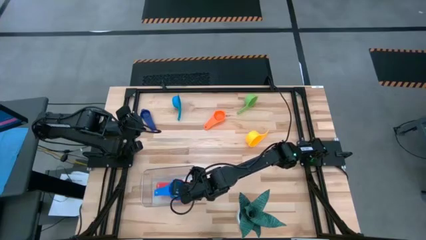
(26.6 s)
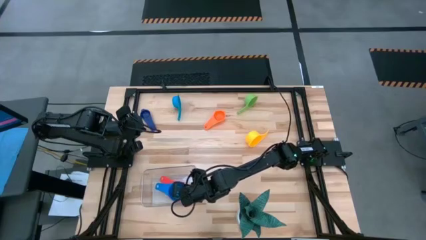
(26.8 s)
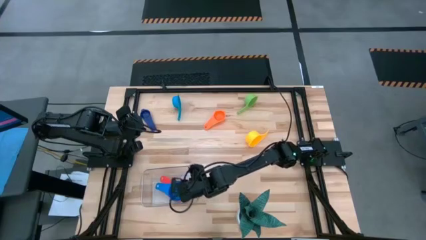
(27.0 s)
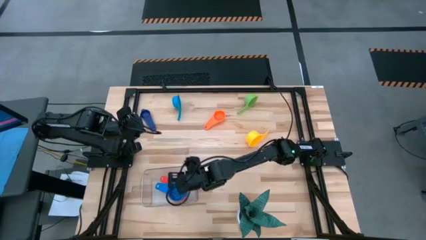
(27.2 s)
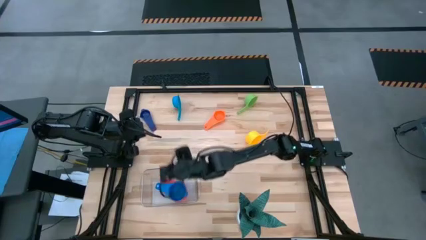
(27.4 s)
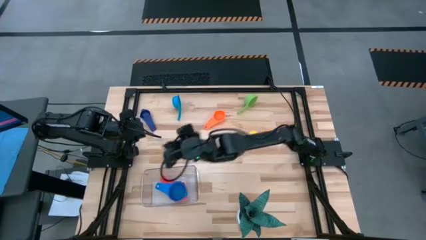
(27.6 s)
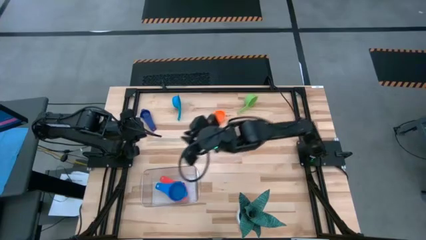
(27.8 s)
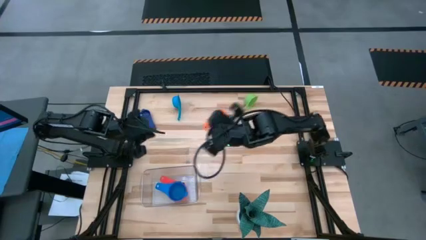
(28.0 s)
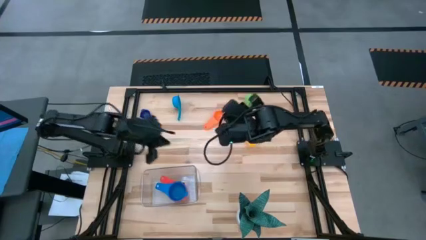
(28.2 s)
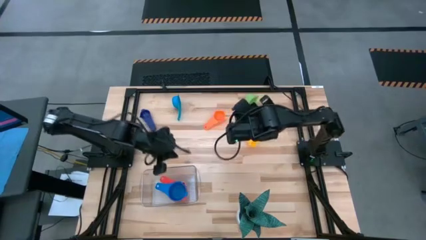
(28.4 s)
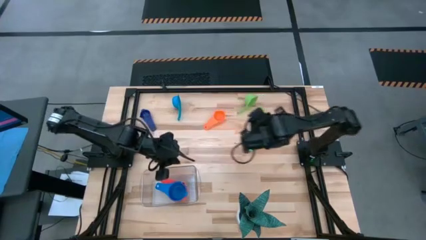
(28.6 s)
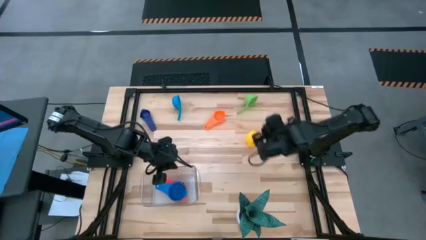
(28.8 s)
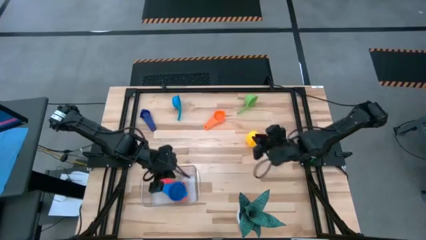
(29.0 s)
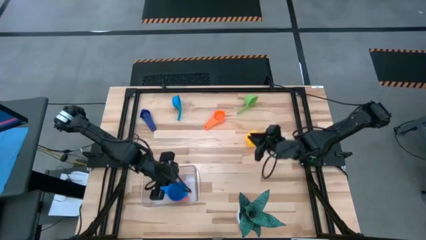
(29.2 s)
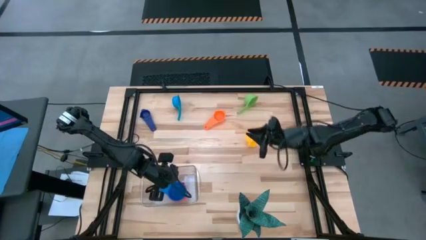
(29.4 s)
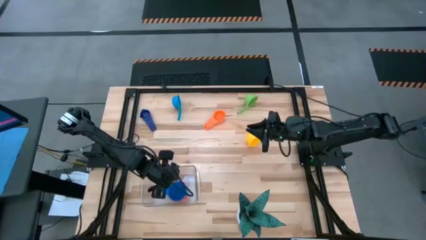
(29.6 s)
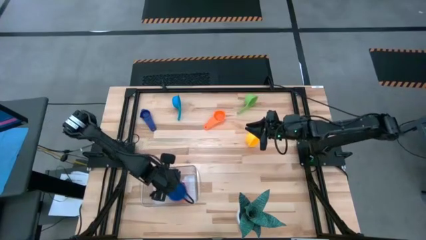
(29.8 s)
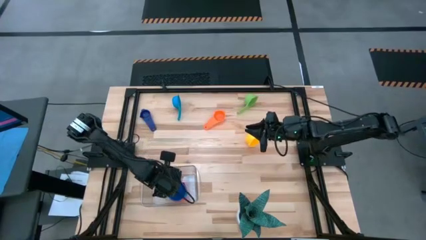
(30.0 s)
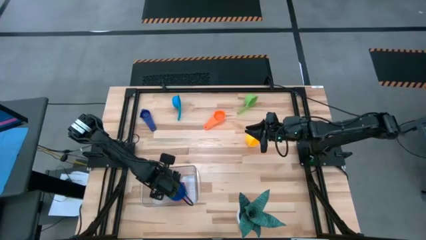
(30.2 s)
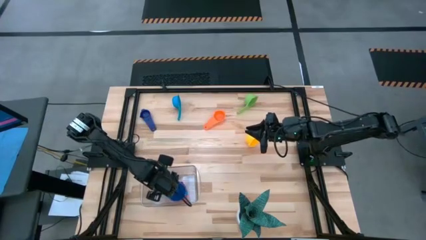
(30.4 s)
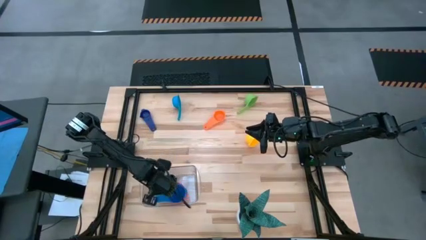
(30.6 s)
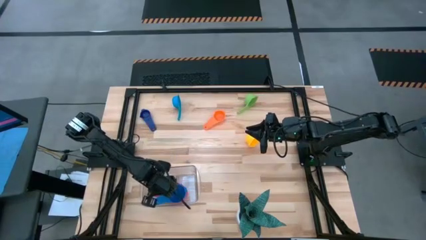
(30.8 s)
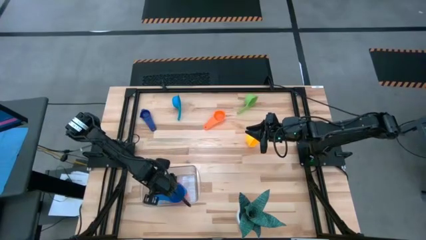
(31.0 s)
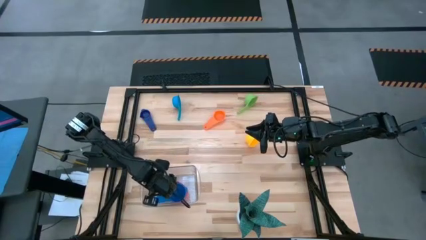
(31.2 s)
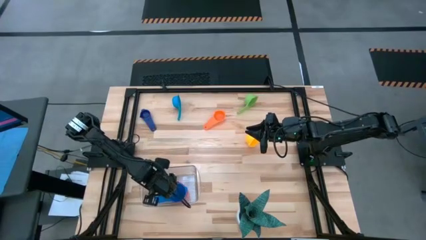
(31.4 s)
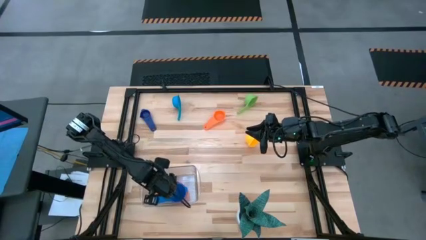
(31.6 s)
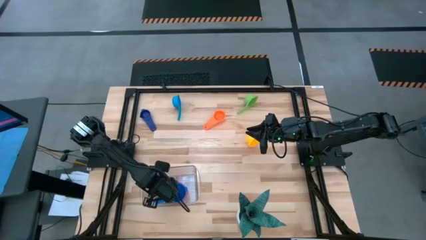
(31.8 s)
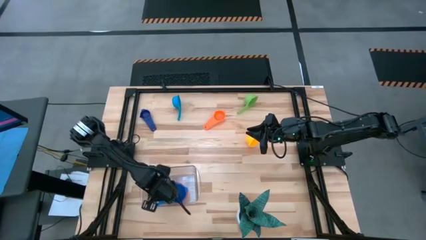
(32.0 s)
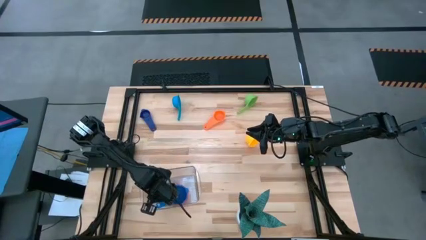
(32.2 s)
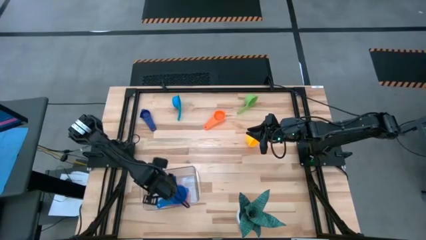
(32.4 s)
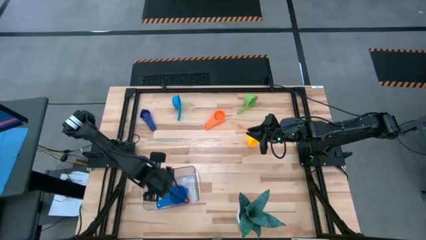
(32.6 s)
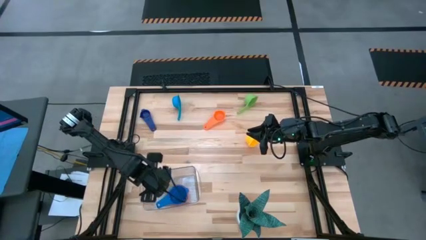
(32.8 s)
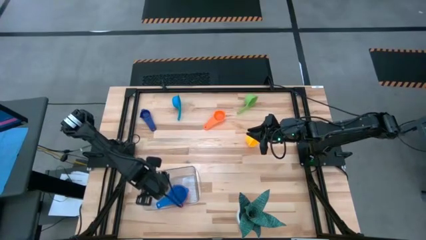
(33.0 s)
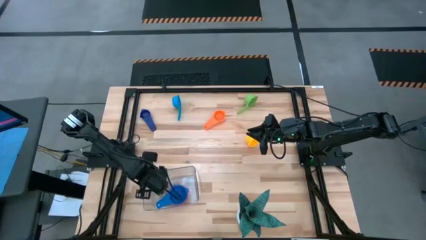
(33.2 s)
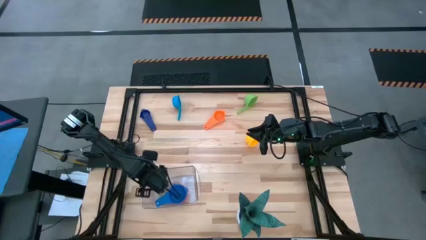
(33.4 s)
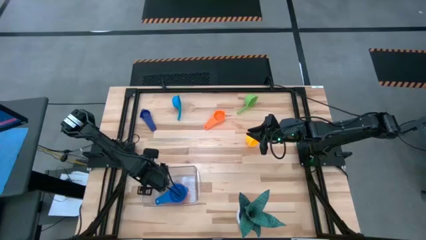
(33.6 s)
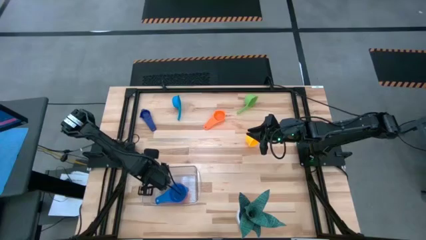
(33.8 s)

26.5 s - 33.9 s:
Task: Nest measuring cups in basket
Adjust the stacked measuring cups in the transparent bin

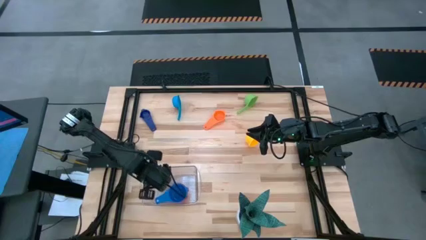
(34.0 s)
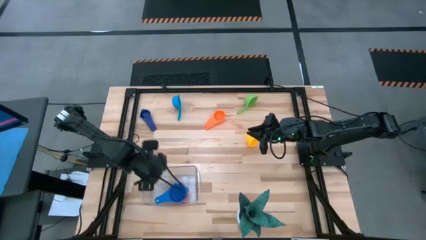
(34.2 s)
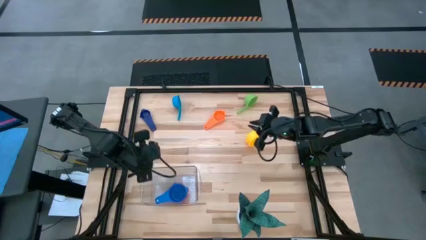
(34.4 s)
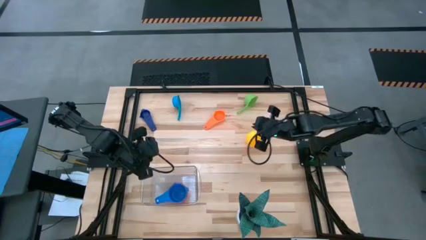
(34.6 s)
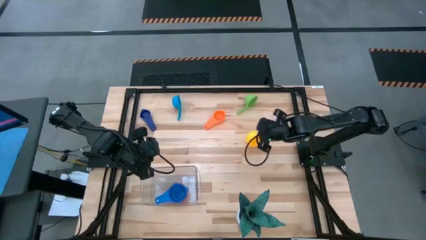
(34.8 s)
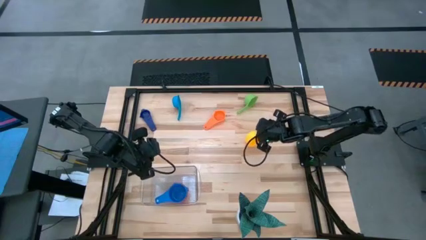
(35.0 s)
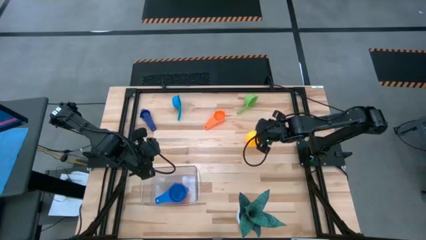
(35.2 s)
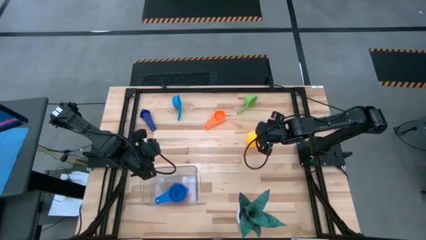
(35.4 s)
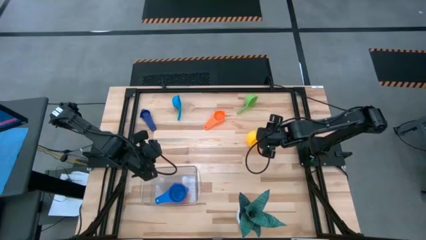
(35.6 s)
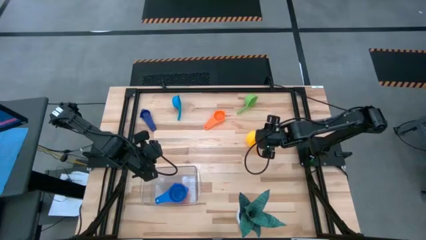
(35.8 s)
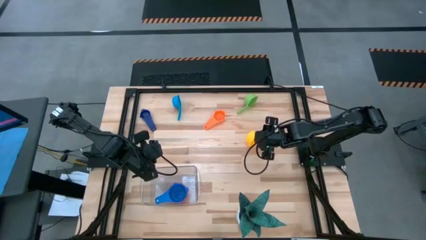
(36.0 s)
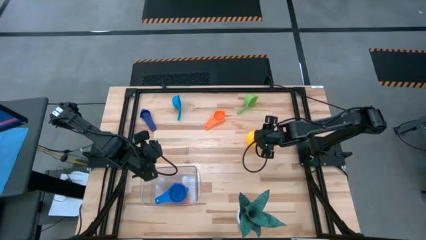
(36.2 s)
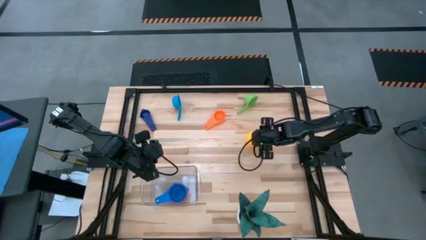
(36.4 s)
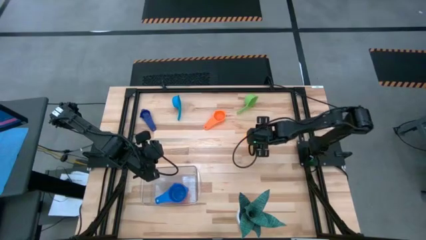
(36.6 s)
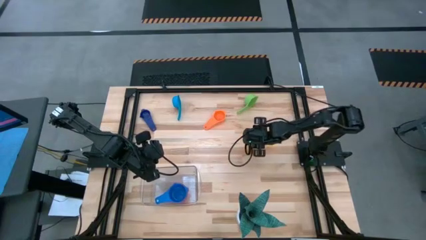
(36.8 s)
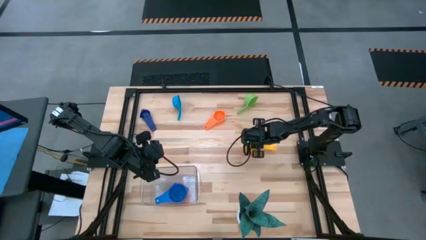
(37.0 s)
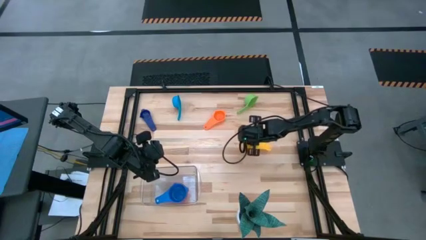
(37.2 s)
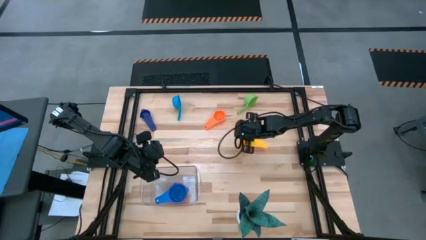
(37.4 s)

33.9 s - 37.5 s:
Stack the yellow measuring cup on top of the blue measuring cup in the transparent bin

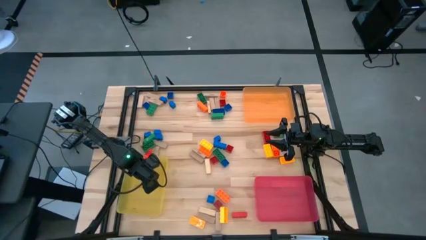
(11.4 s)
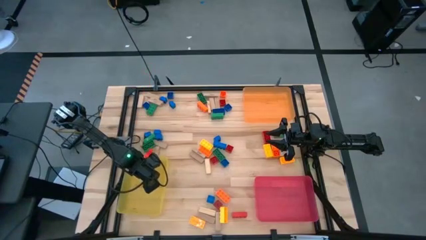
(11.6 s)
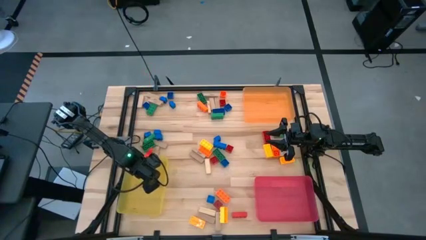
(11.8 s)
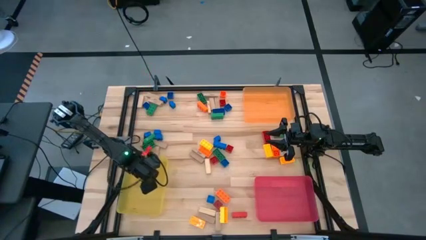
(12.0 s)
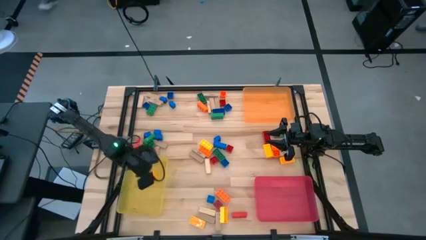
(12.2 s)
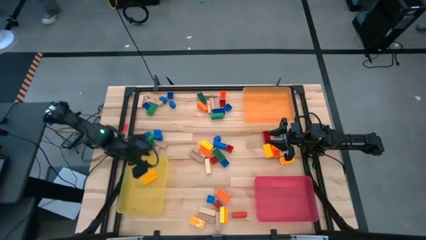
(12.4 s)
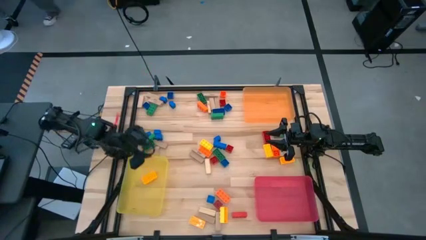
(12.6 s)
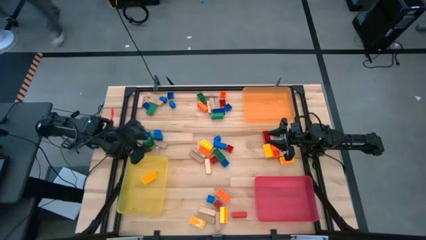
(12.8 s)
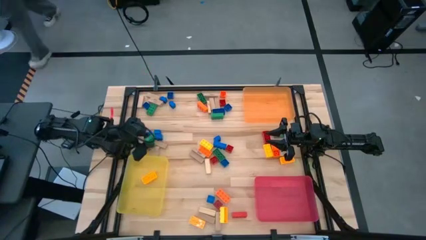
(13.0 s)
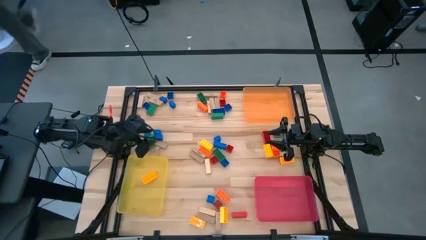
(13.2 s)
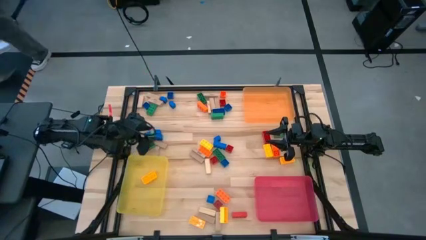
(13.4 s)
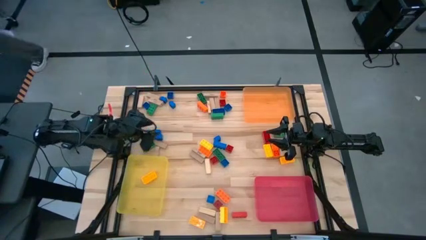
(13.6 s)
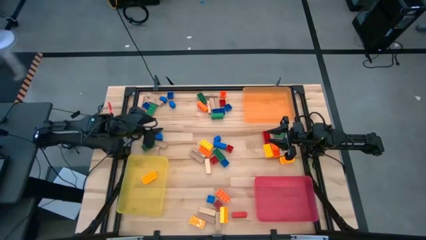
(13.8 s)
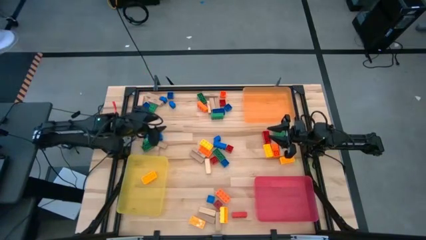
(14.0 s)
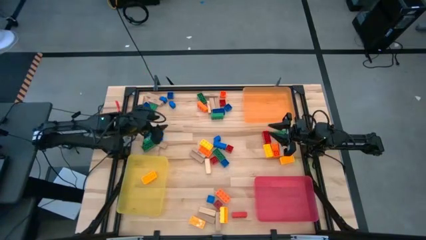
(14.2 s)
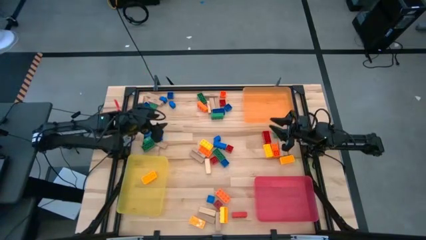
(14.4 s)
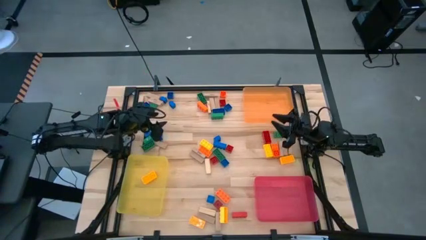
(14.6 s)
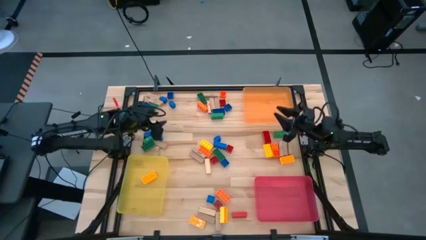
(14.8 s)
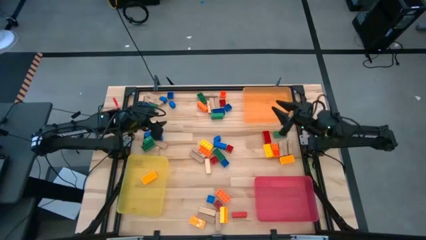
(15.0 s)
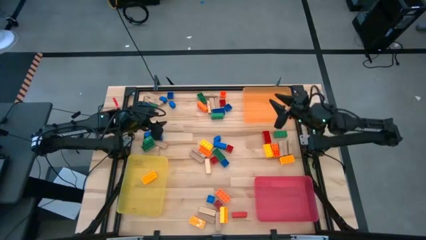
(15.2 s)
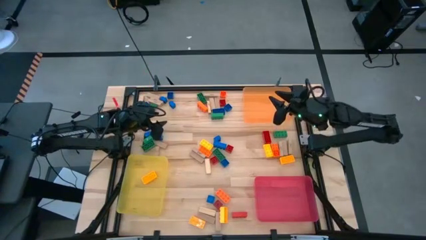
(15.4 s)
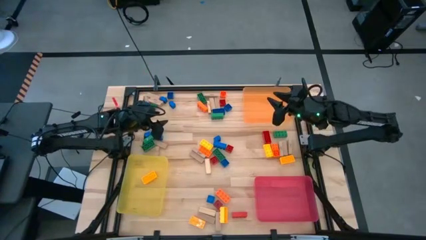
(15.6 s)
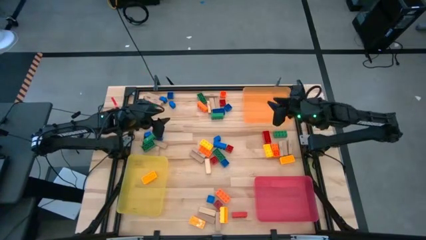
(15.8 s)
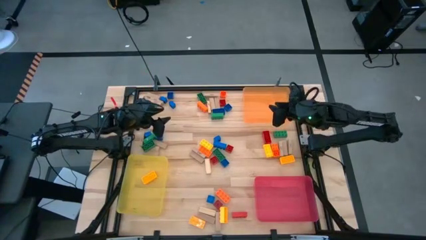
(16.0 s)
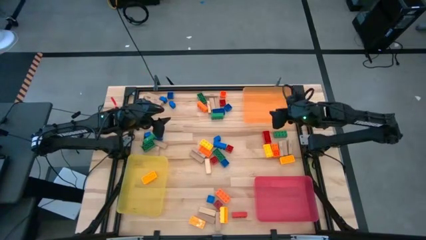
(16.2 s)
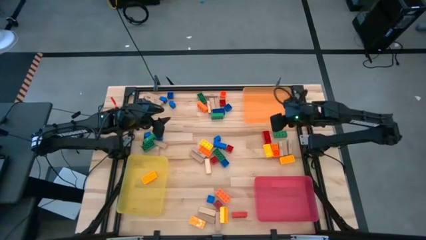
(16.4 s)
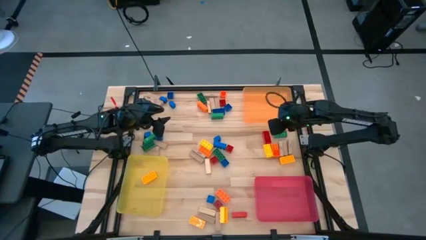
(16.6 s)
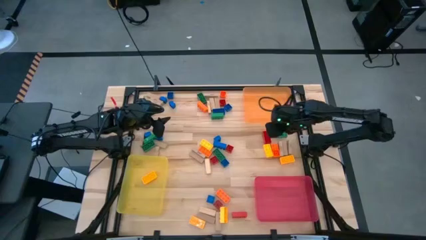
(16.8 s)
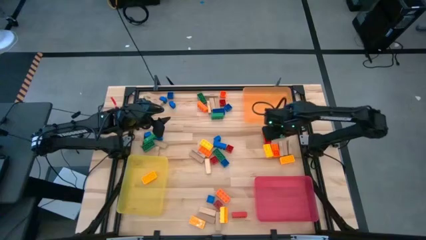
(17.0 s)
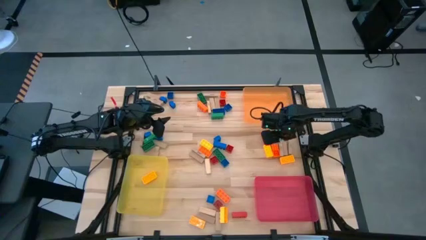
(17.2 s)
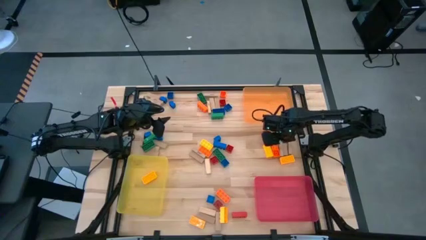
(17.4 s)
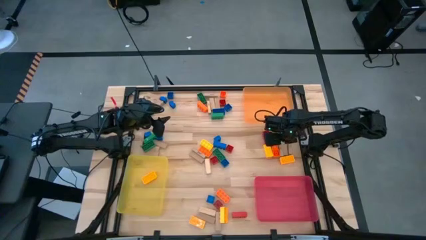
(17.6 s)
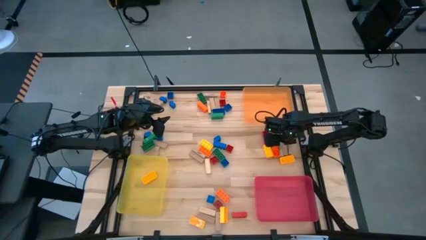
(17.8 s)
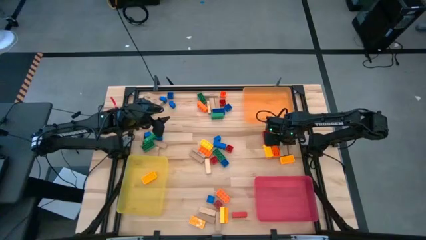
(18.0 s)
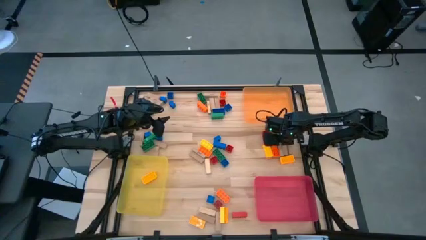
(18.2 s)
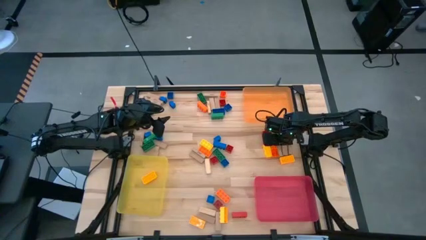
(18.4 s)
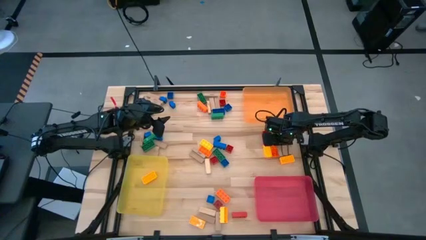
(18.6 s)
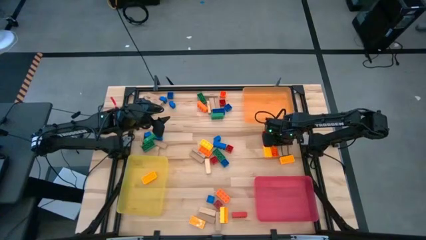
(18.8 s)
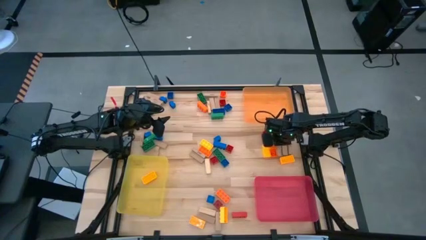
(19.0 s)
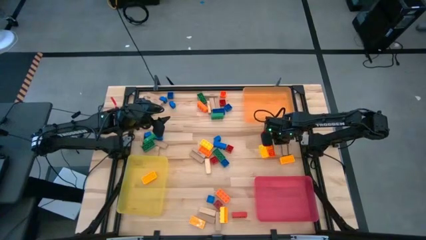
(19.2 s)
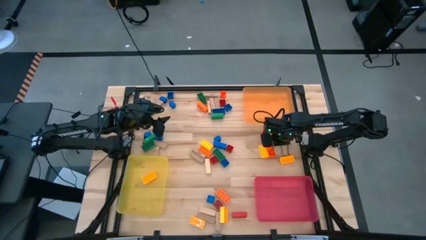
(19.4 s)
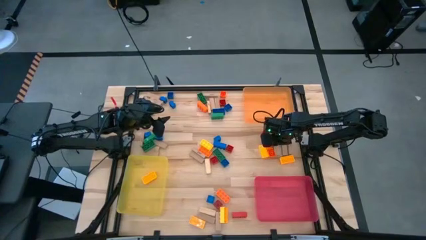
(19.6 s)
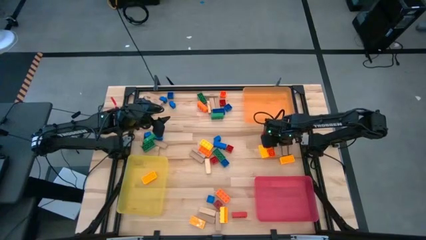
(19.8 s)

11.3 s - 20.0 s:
Task: Sort blocks by size
Put the brown block into the orange bin
